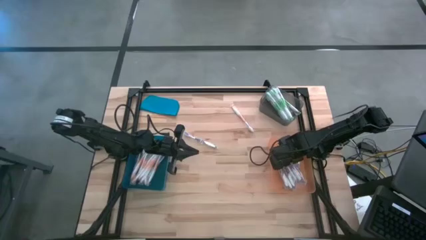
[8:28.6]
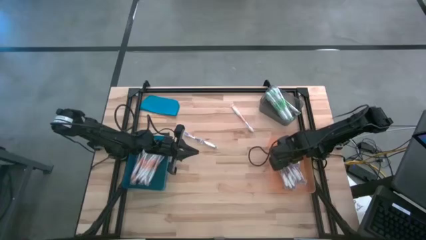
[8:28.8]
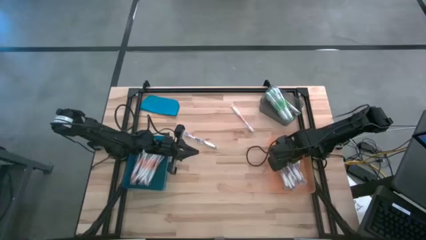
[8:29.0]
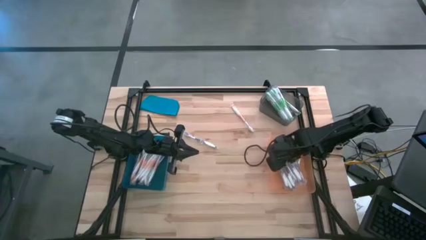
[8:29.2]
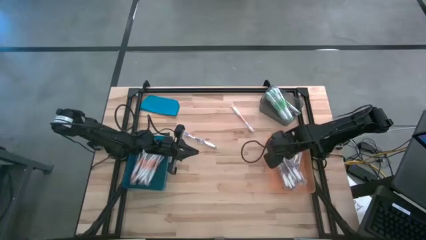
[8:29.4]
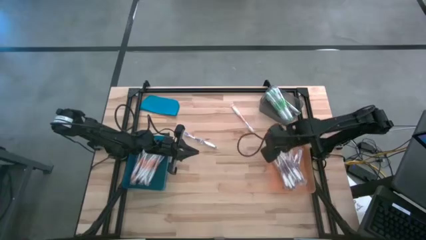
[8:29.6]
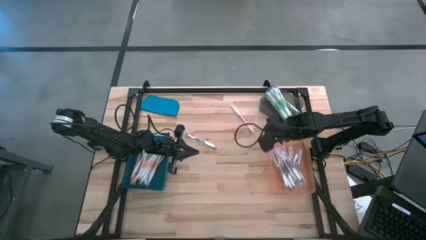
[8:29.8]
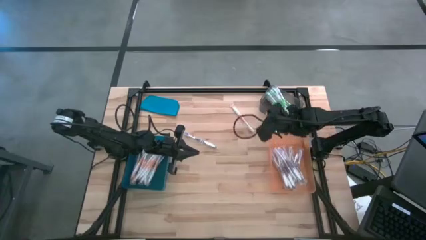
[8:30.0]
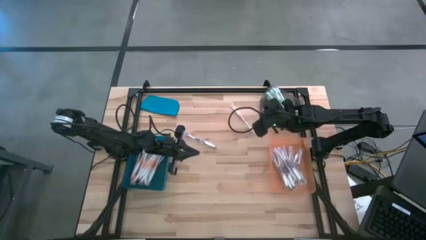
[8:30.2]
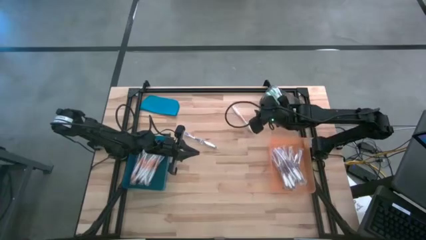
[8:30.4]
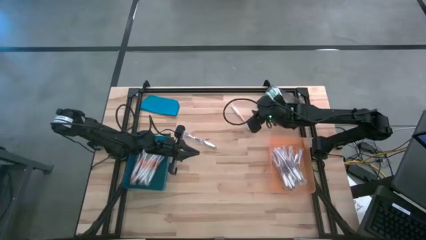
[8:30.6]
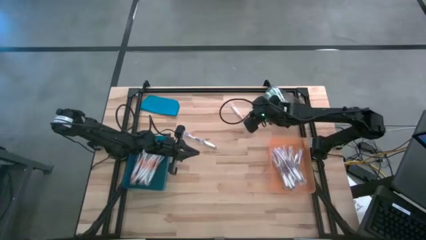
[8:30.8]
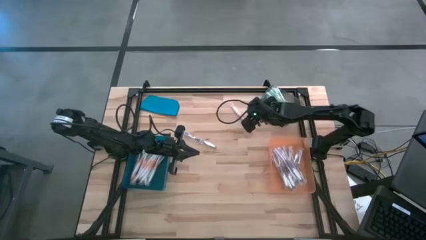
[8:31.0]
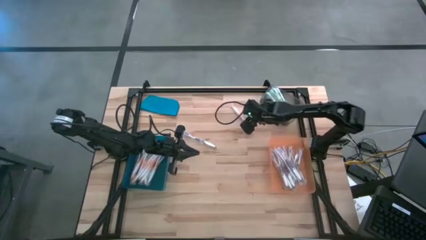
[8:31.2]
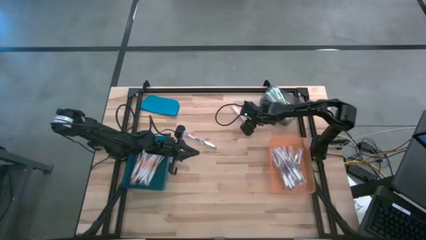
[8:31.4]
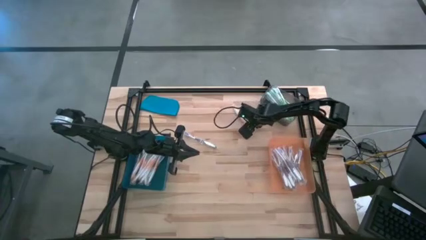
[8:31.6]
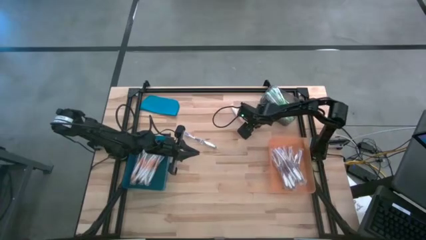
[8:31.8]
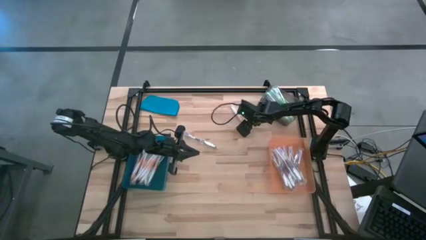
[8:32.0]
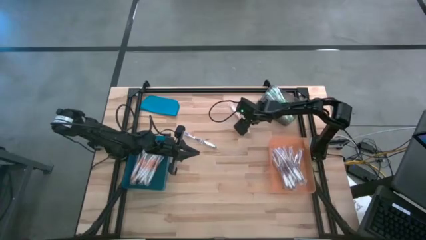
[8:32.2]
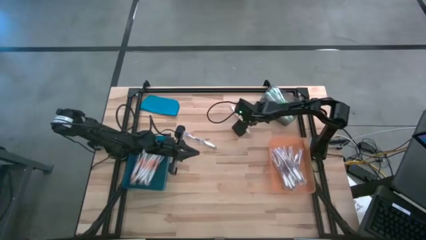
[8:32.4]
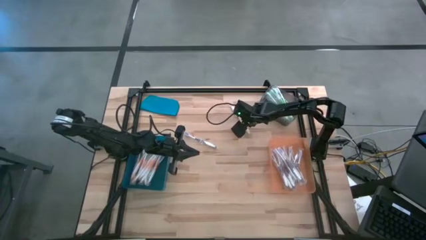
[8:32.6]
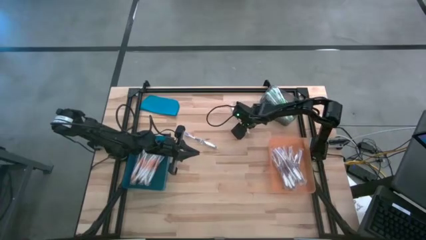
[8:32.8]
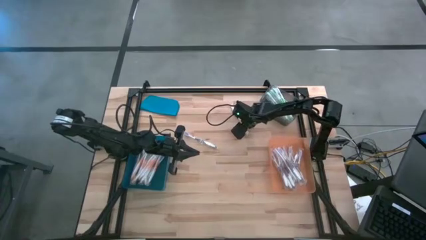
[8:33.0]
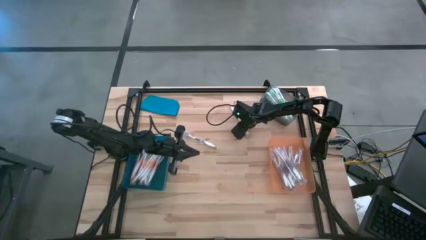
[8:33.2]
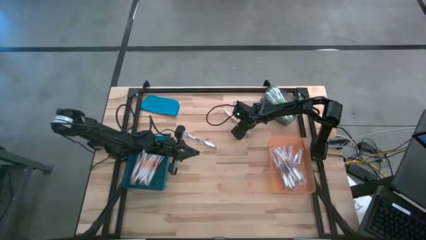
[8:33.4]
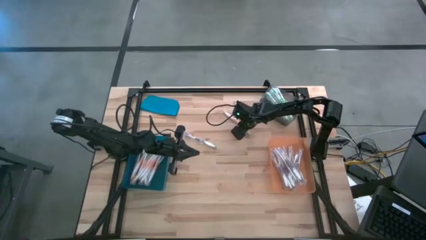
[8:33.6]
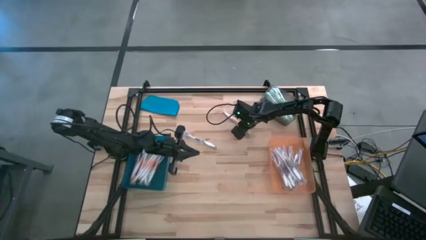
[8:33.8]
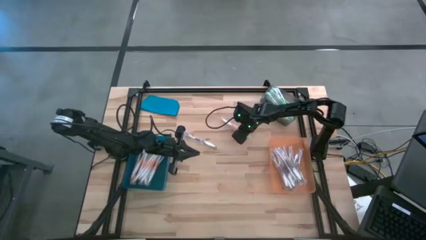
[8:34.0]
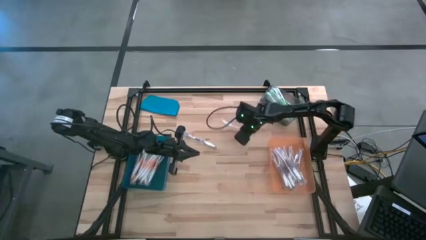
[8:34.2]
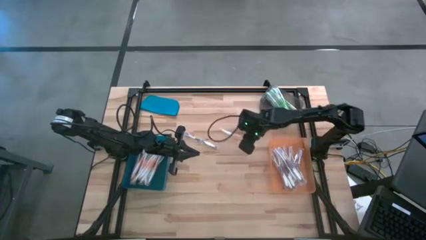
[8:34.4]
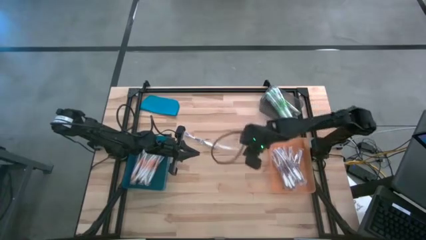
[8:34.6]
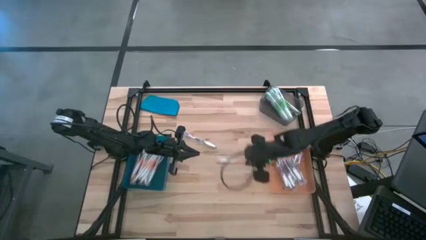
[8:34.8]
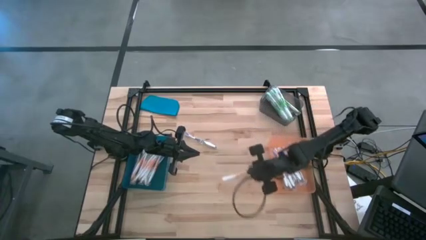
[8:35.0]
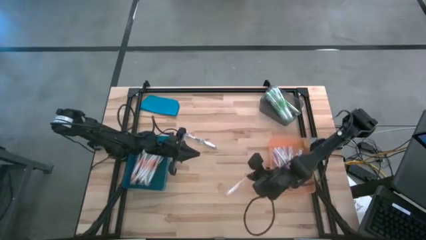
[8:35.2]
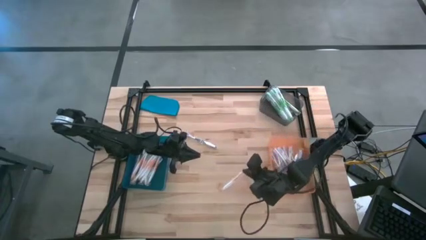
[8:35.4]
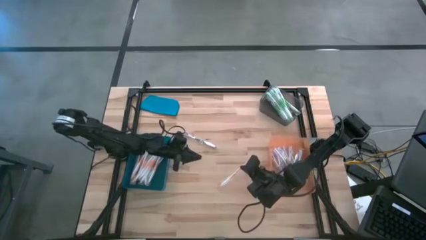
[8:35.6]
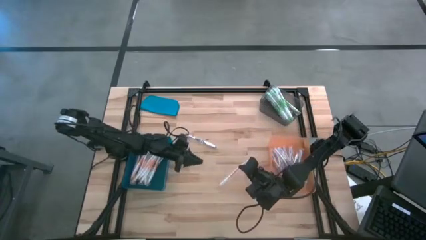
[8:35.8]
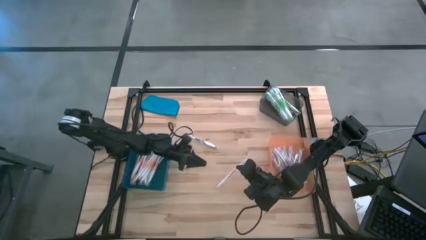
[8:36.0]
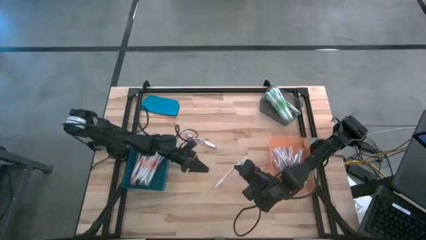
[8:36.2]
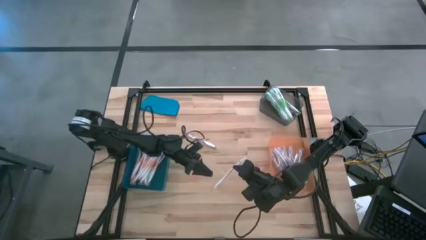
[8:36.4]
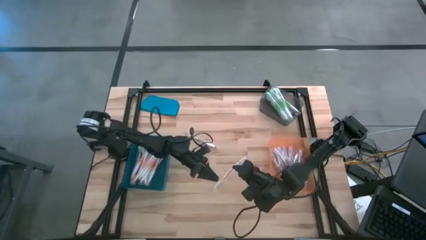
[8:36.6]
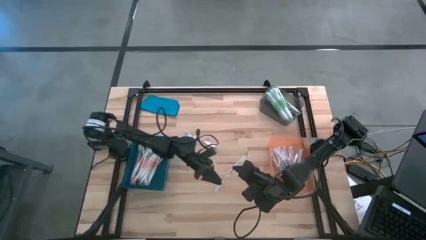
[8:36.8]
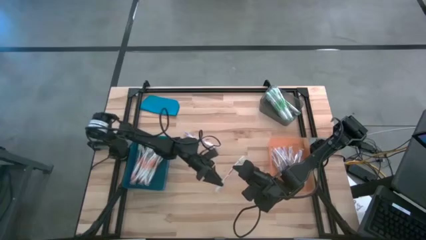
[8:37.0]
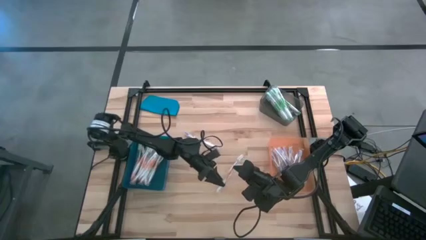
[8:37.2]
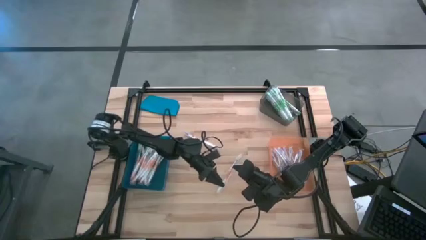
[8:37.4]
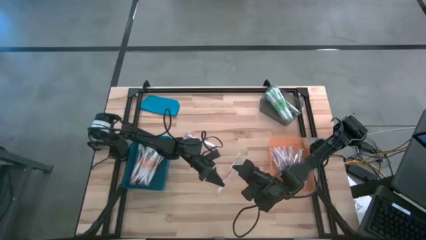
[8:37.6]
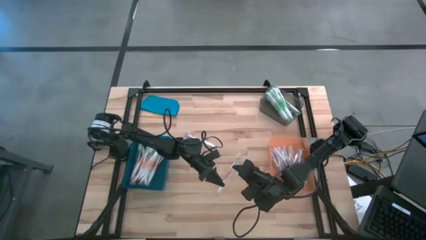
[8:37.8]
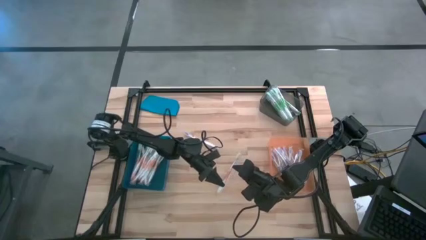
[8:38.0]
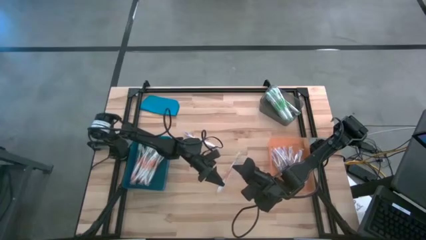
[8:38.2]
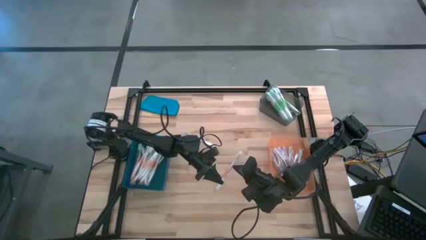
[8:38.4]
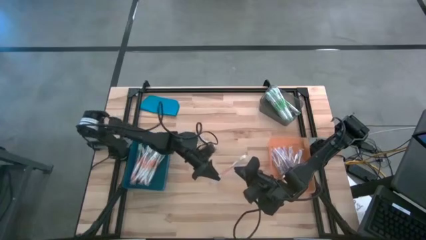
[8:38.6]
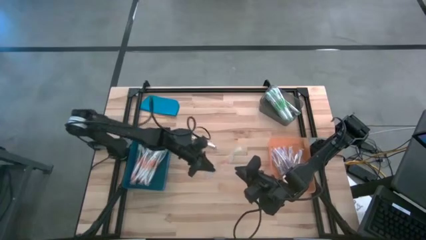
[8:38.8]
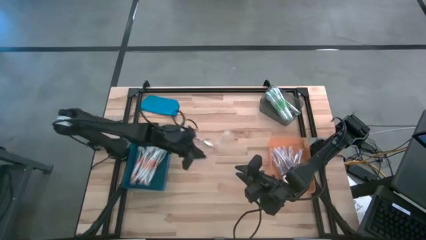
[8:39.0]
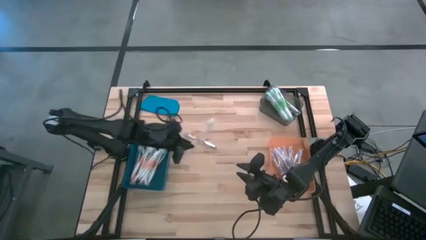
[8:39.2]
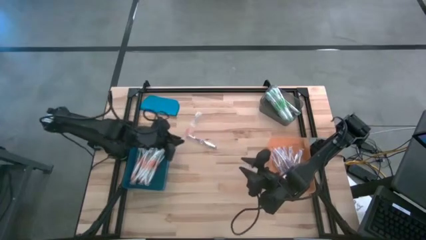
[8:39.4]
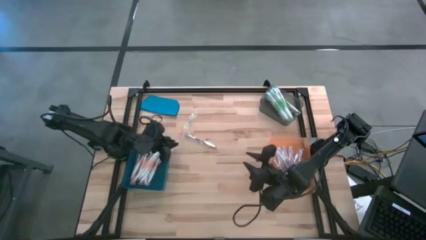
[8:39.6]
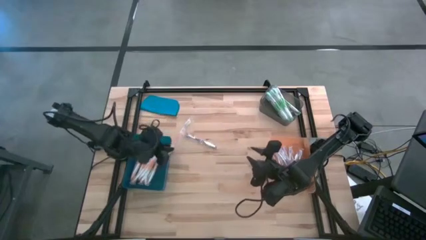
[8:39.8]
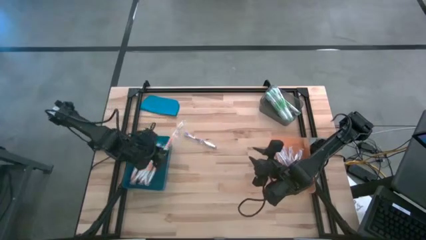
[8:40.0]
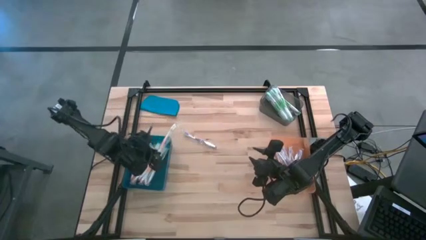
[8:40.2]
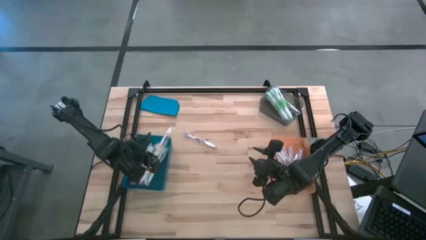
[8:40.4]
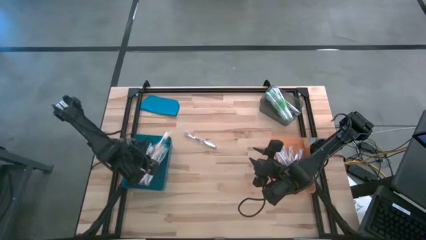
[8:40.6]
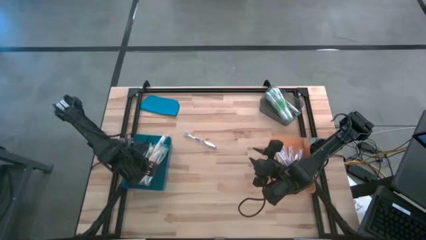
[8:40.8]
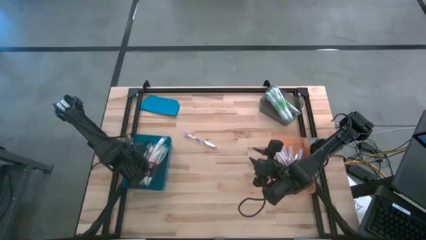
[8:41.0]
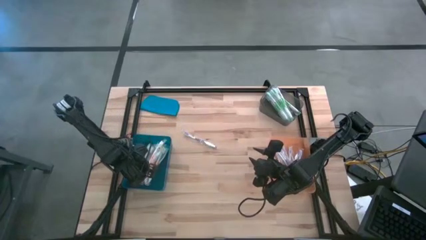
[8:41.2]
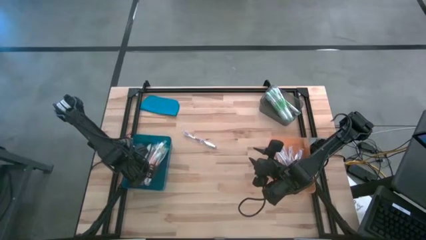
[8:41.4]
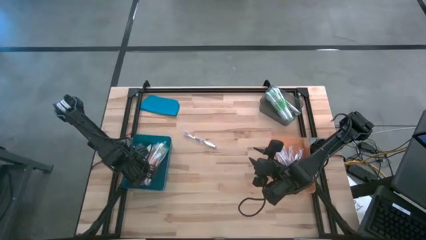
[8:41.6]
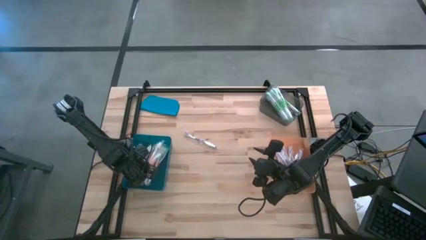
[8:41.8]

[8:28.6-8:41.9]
Task: Pick & Place Toothbrushes
Put the orange toothbrush into the blue bin
